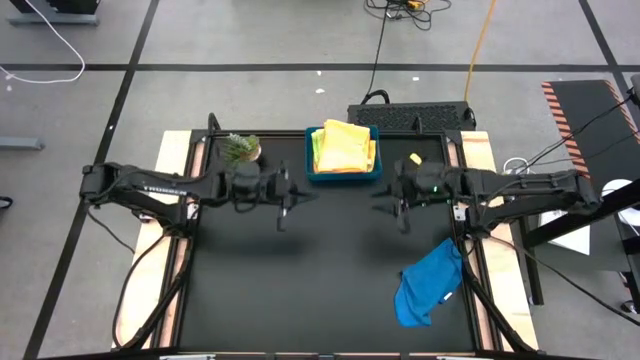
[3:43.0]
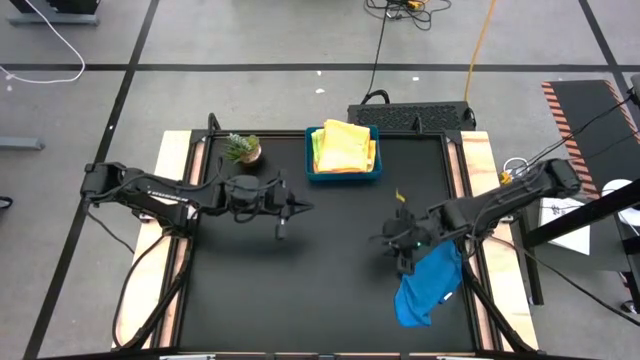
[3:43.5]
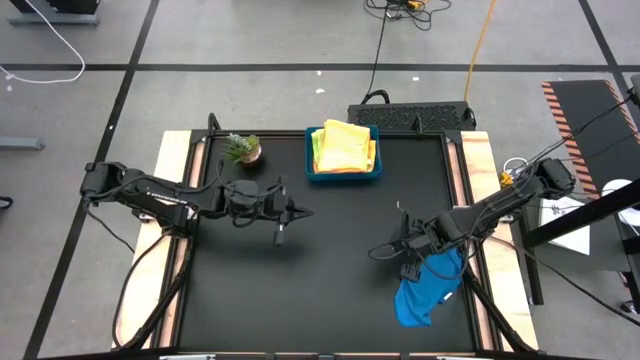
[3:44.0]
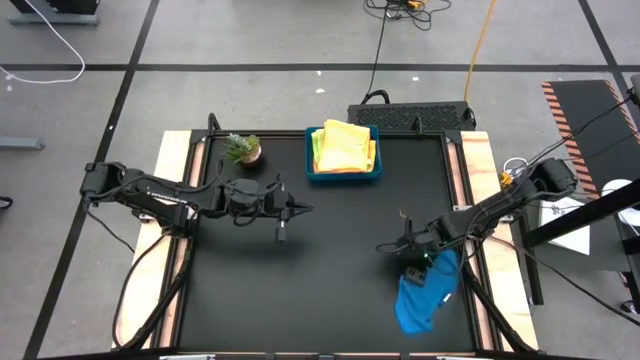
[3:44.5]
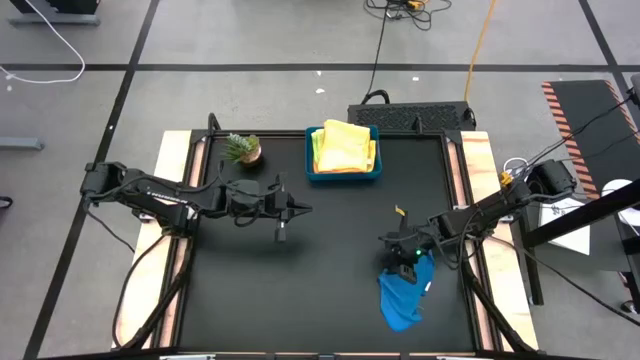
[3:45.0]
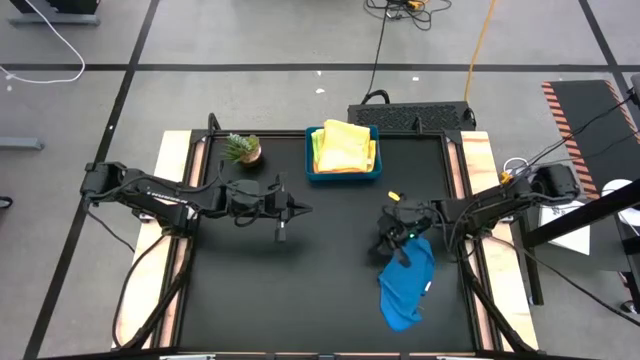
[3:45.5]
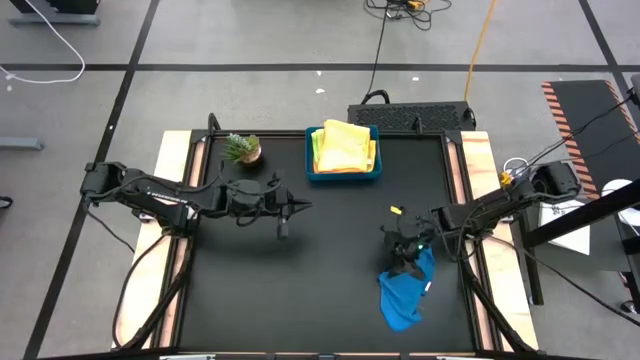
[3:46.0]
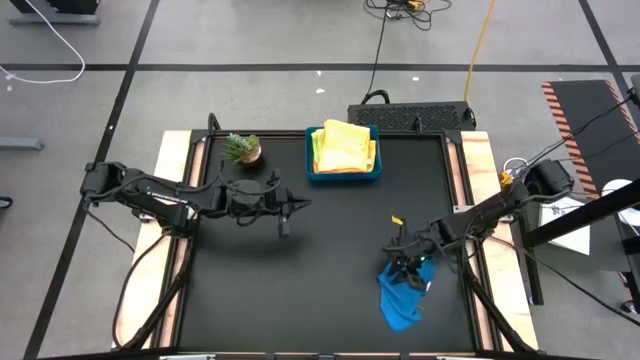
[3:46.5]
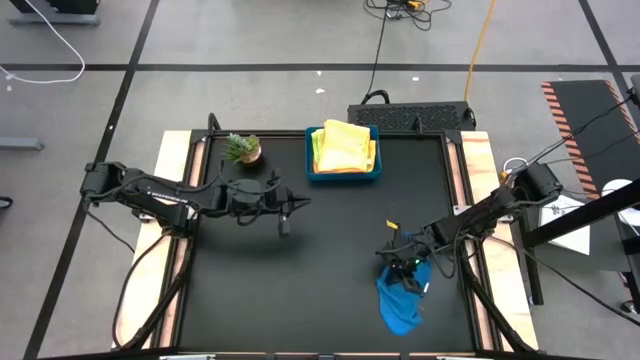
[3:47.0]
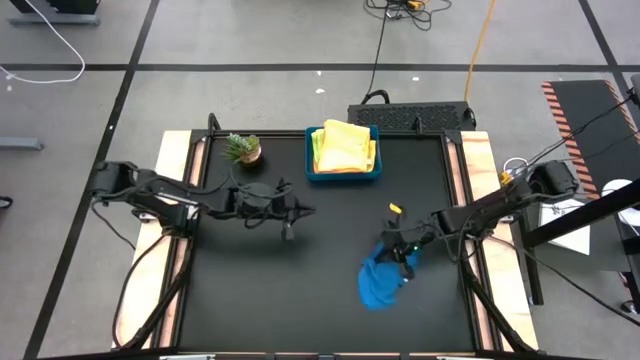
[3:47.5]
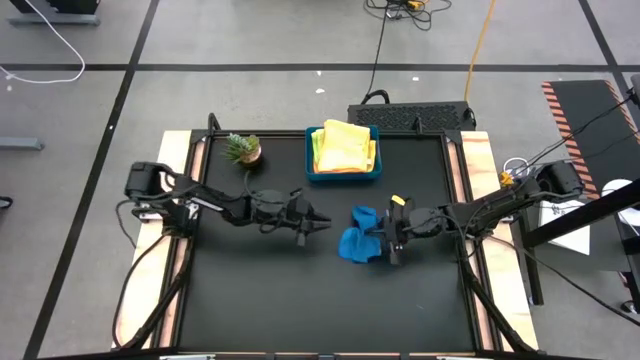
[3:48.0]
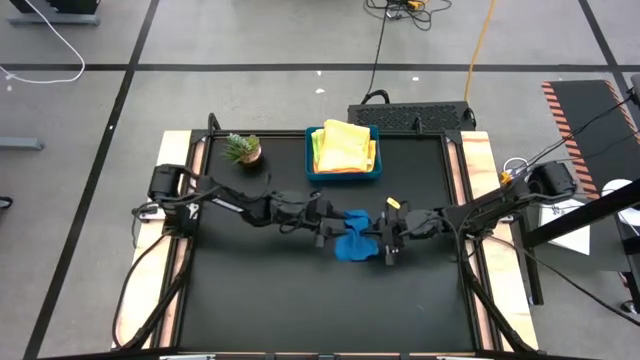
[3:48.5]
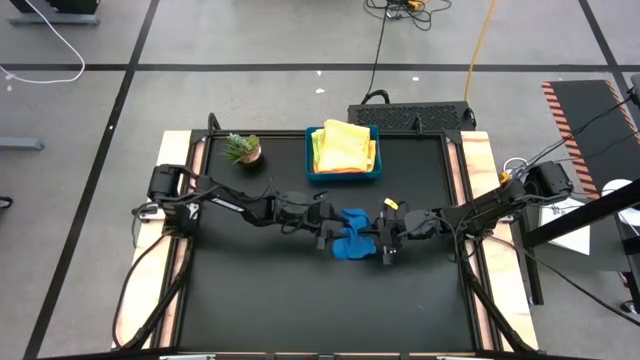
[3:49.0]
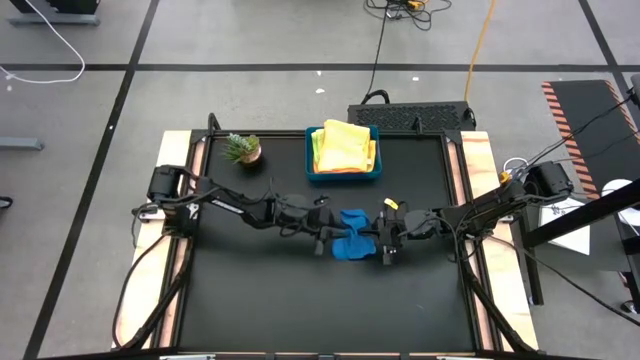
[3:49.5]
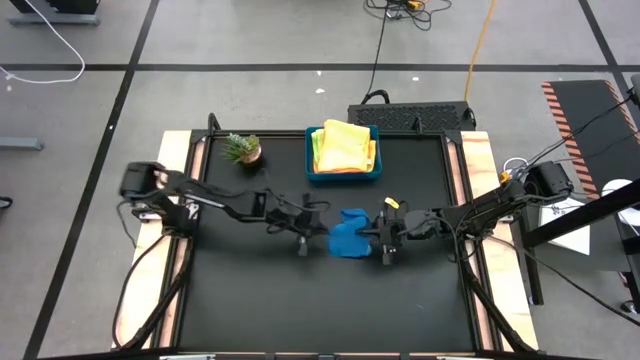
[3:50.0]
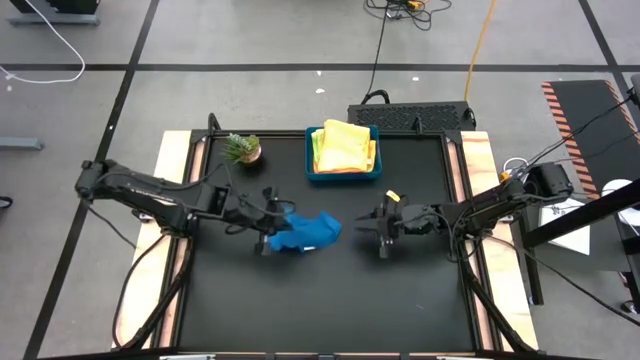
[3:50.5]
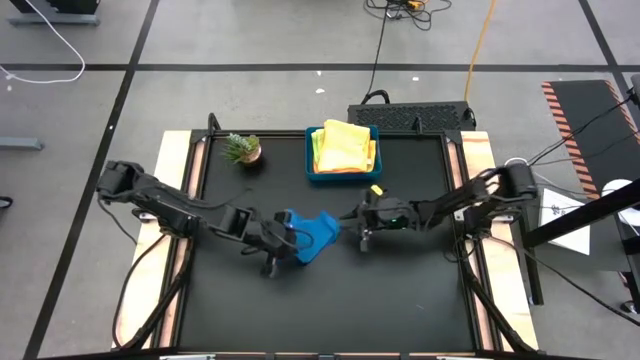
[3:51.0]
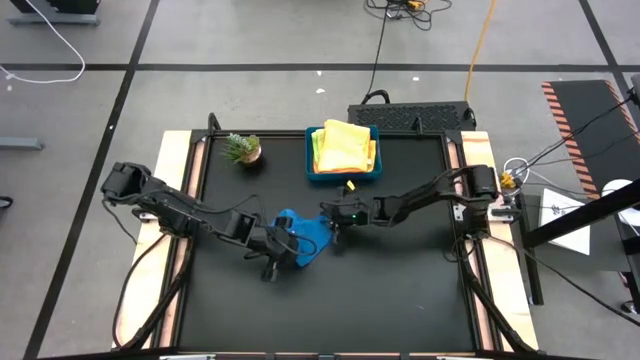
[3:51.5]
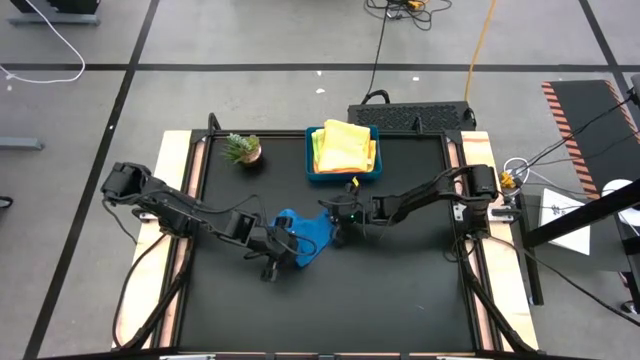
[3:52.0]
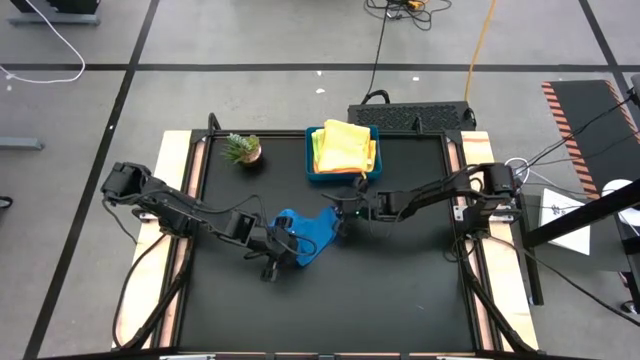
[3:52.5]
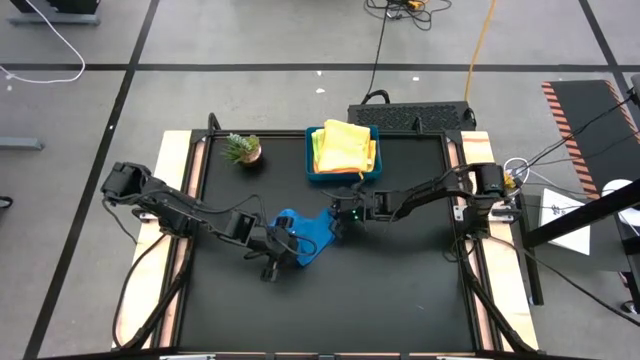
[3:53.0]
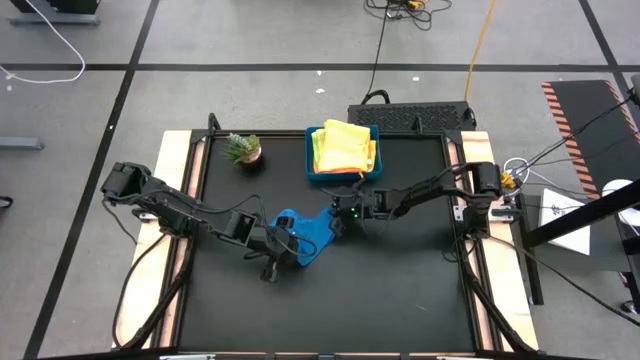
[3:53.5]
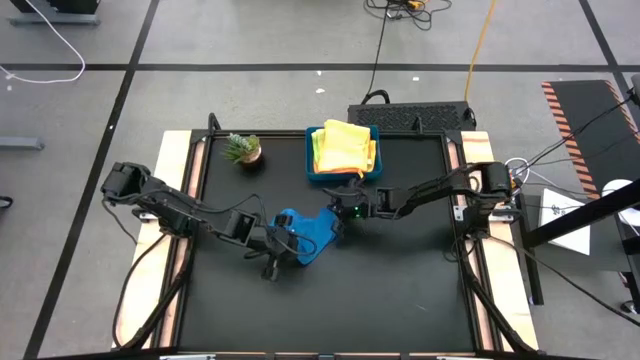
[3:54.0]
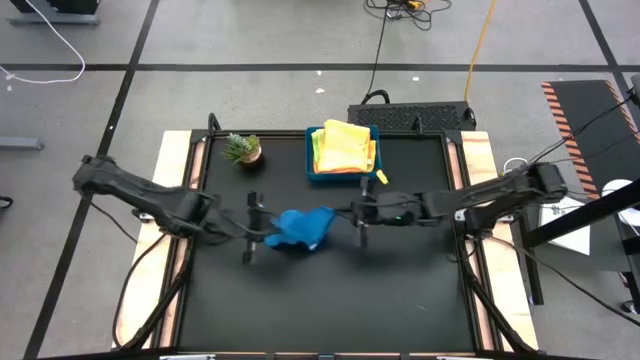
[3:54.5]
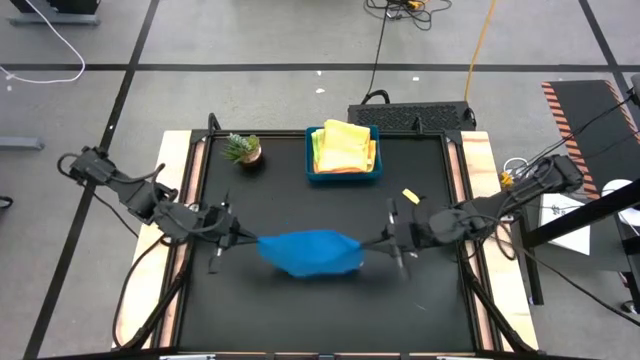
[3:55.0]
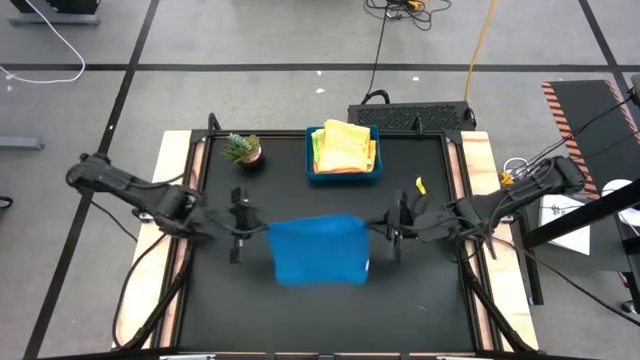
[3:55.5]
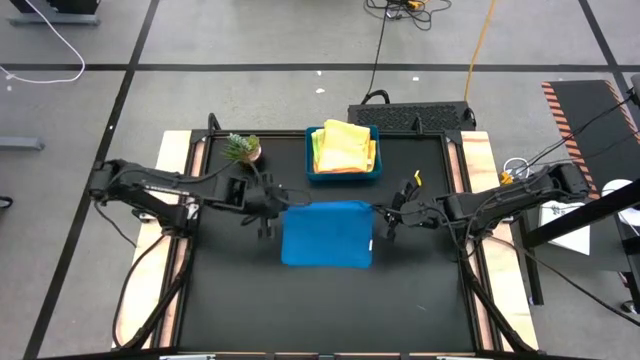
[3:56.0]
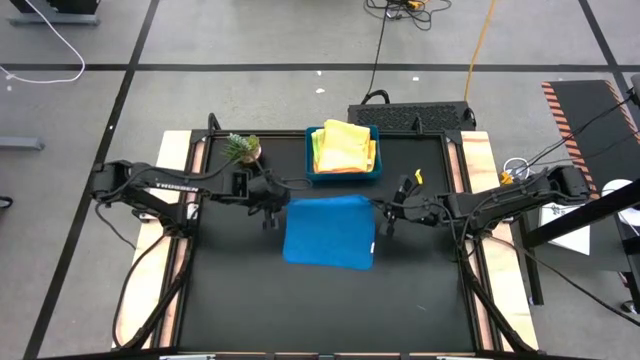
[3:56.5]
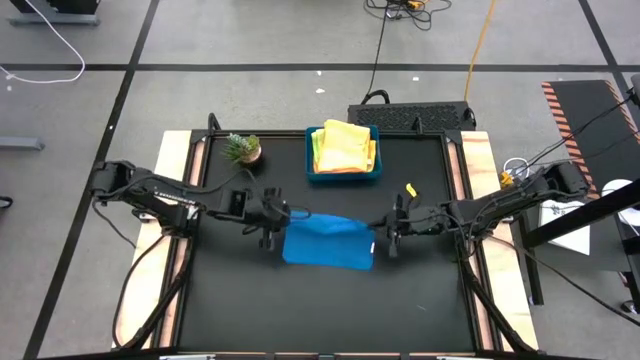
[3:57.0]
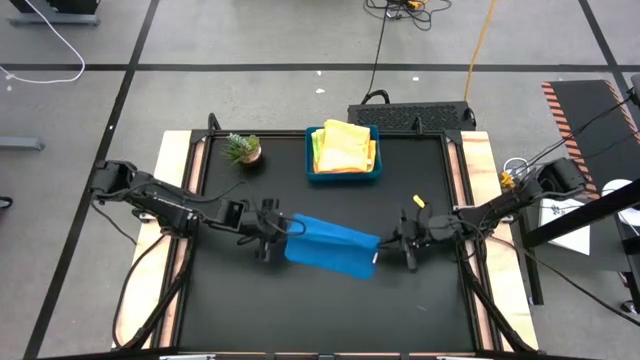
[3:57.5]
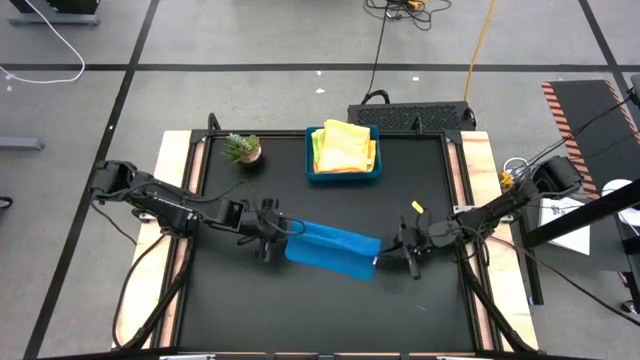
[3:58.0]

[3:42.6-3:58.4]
Task: Fold microfiber towels
Fold the blue microfiber cloth

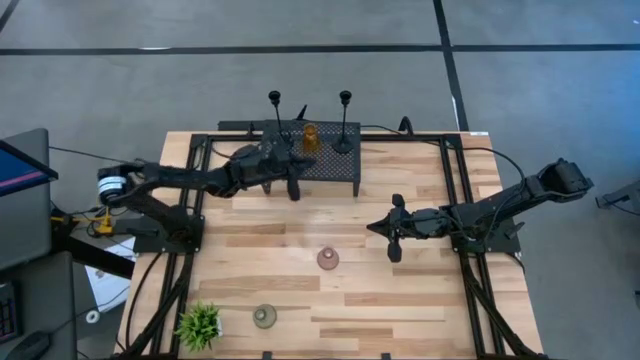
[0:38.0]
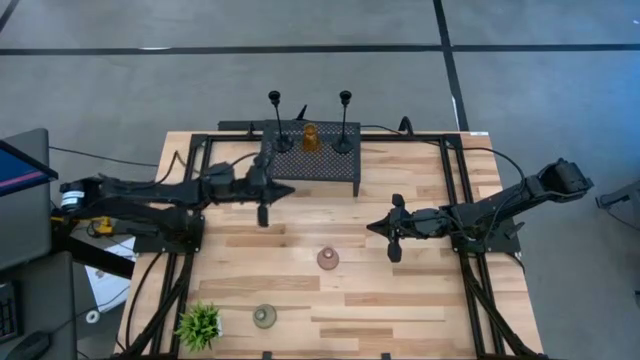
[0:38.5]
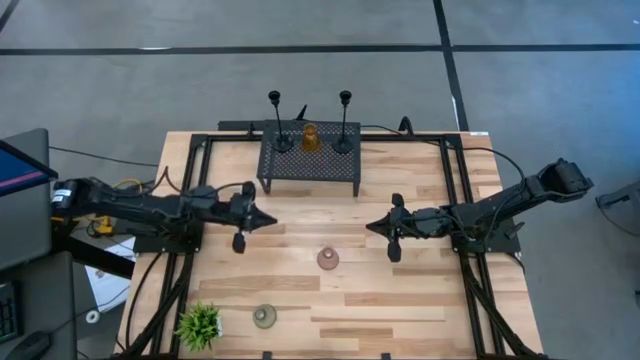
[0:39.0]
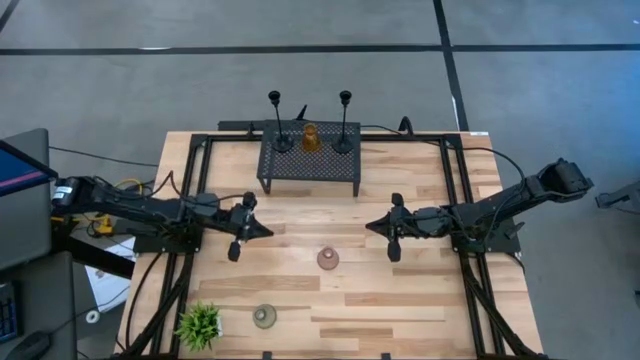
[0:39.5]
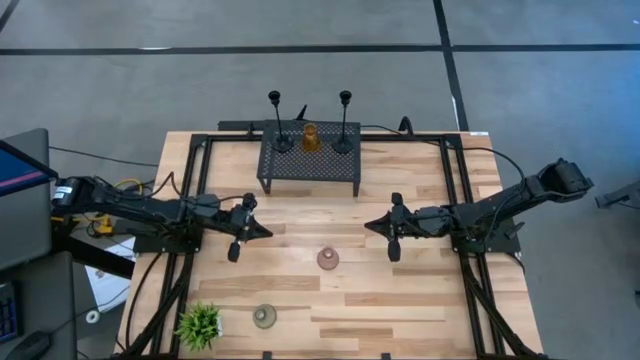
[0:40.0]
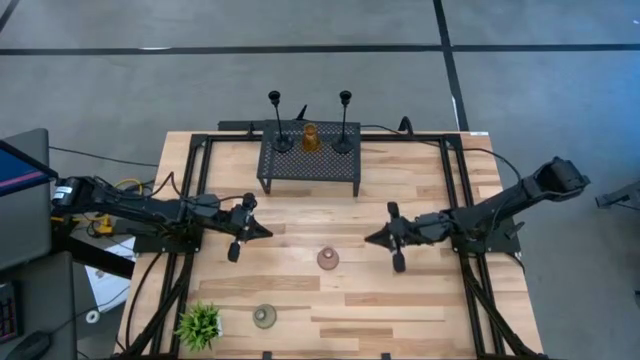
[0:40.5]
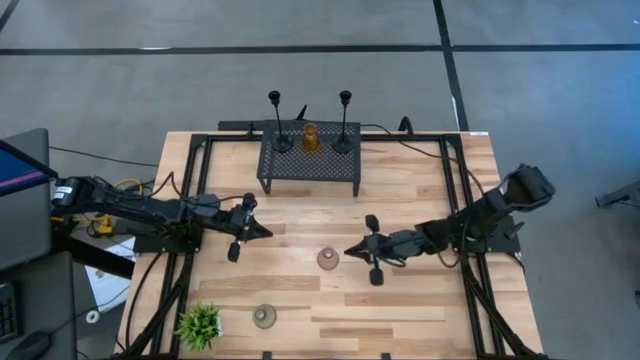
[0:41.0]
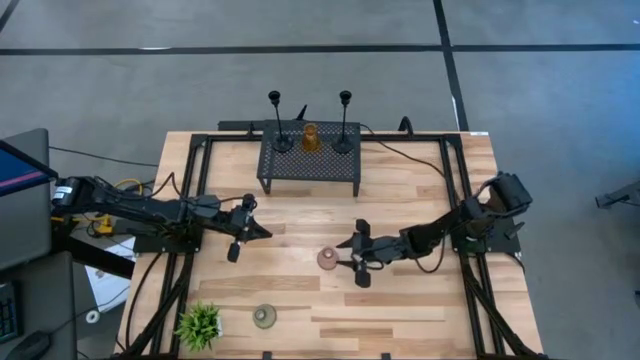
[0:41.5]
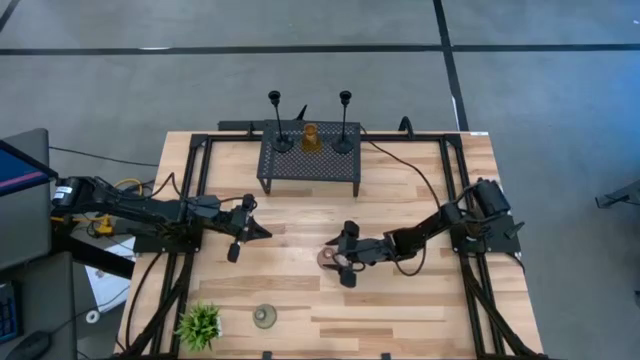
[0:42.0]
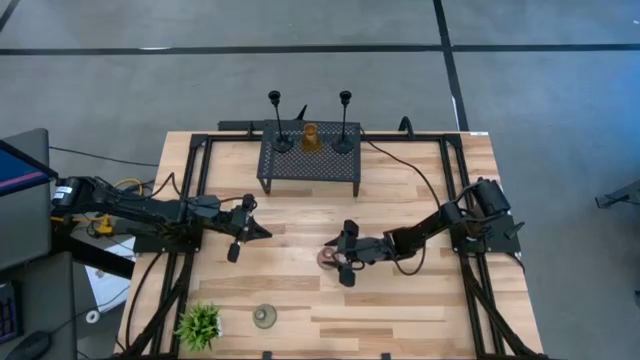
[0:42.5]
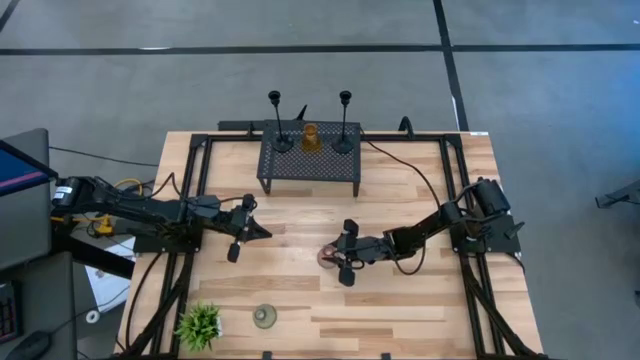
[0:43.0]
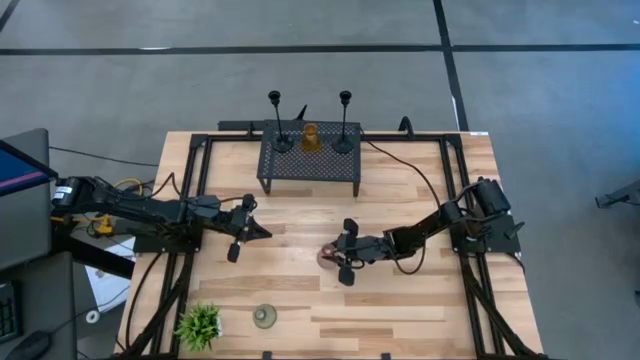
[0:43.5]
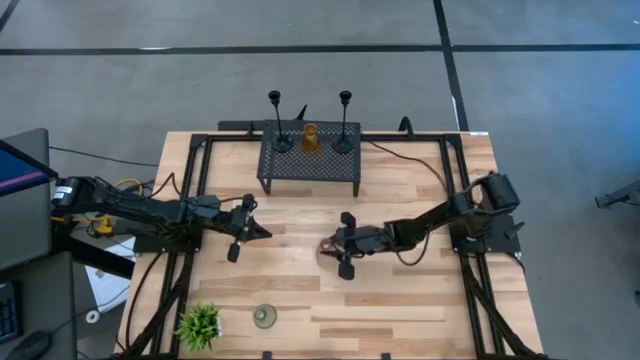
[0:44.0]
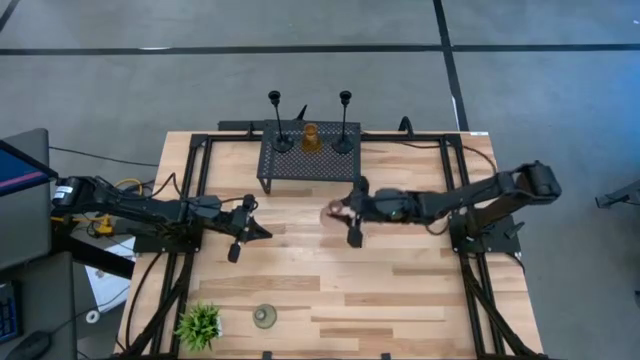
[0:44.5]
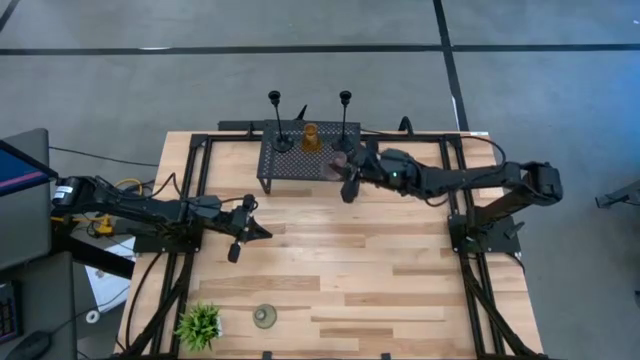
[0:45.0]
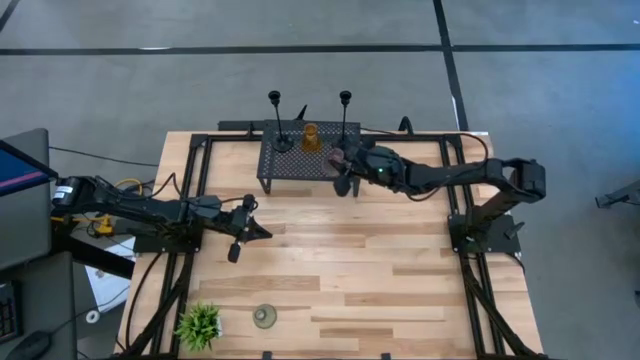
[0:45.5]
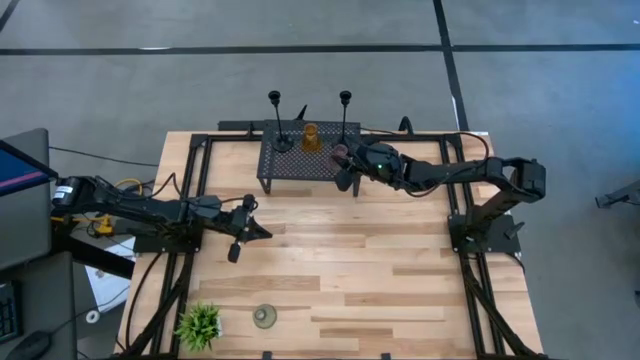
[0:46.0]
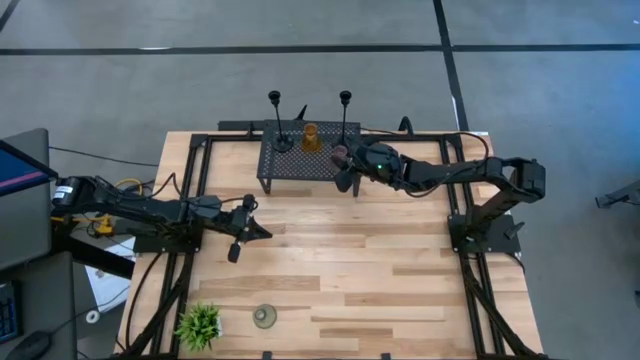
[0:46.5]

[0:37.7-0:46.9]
Task: Pick & Place candle stick holders
Put the pink glass candle holder on the shelf
